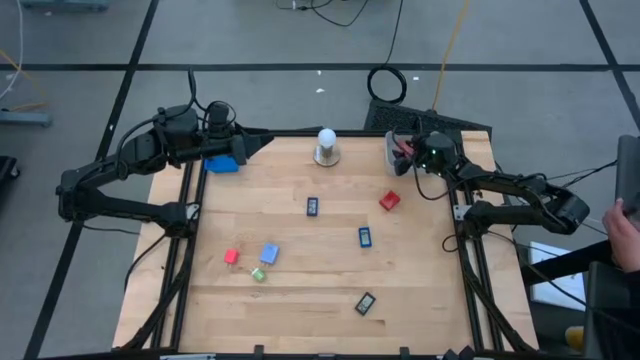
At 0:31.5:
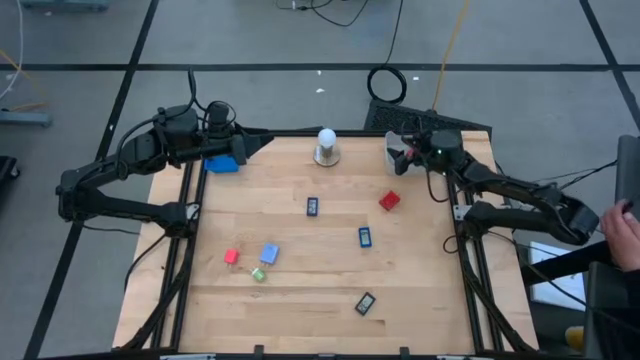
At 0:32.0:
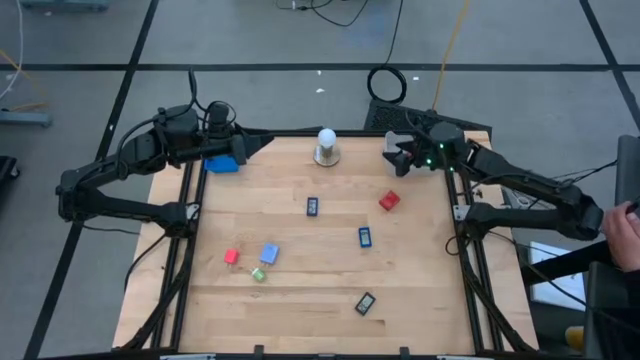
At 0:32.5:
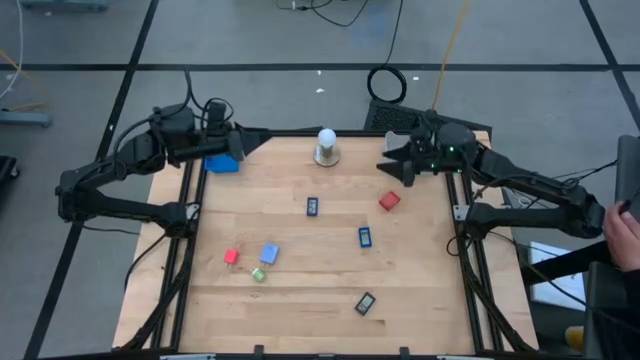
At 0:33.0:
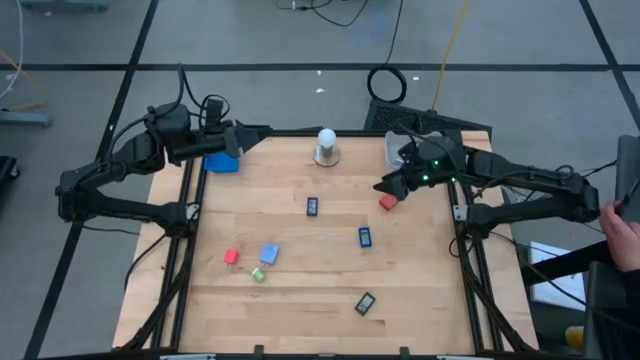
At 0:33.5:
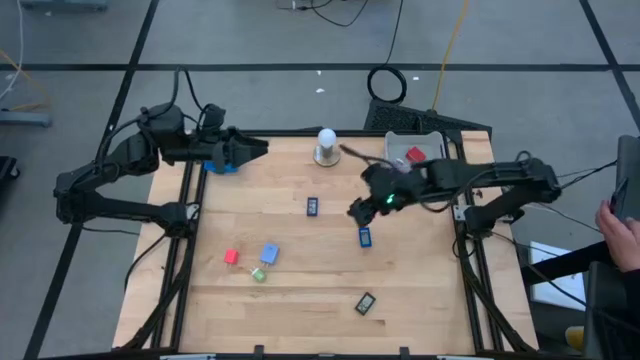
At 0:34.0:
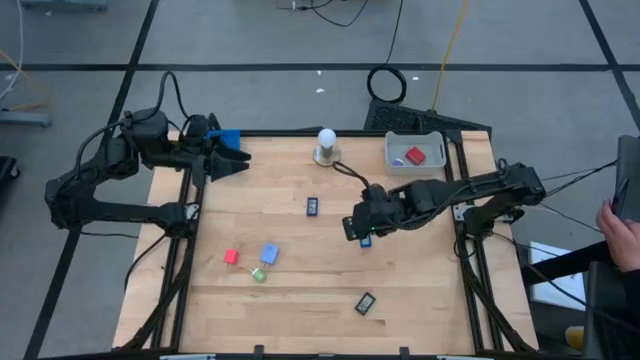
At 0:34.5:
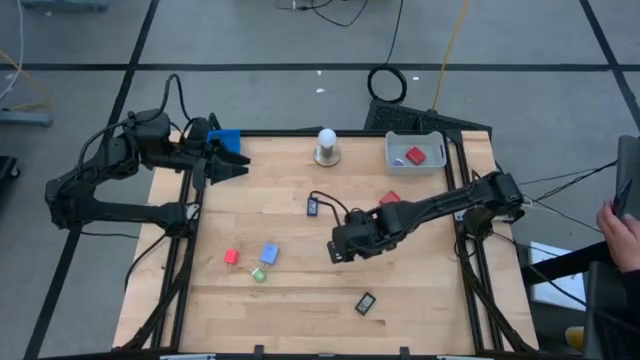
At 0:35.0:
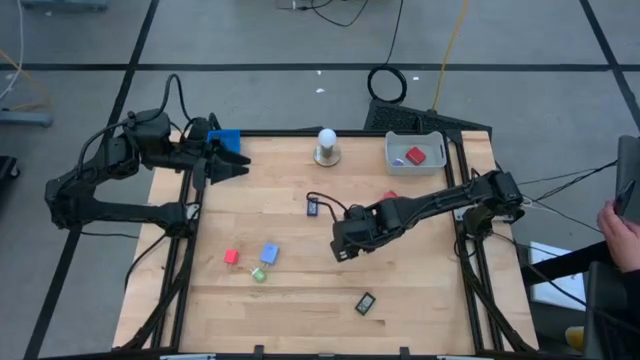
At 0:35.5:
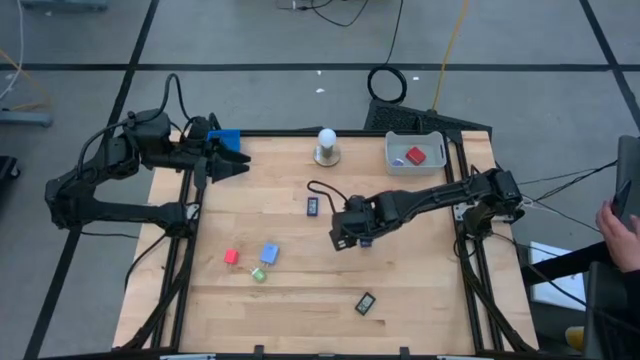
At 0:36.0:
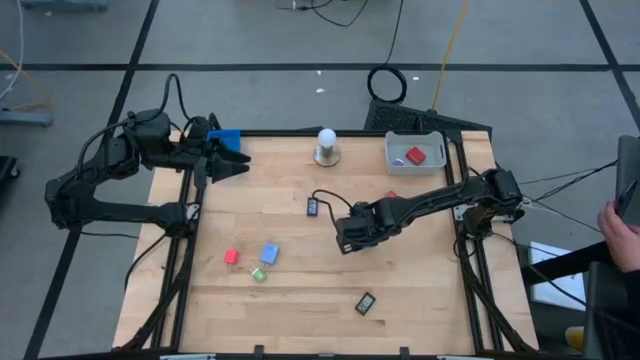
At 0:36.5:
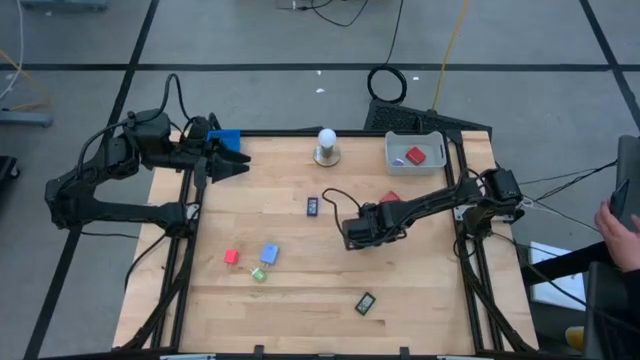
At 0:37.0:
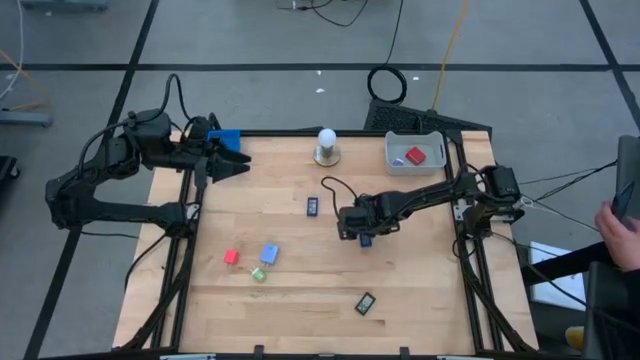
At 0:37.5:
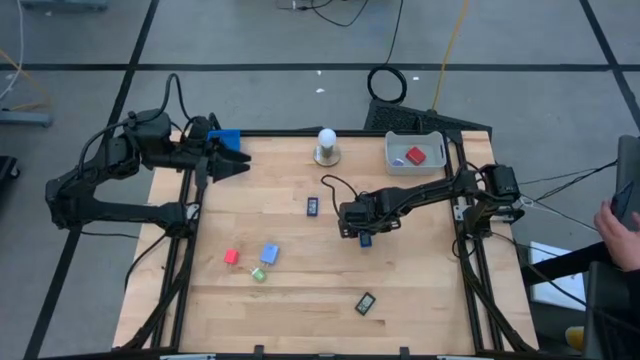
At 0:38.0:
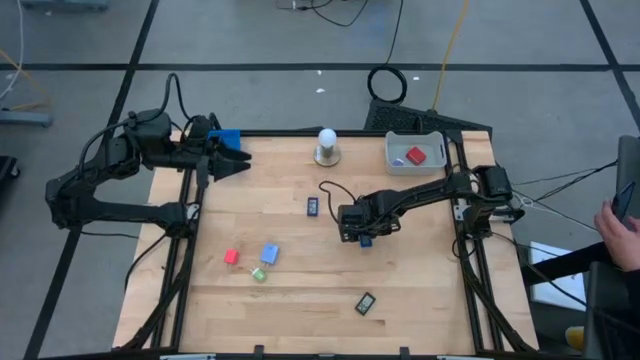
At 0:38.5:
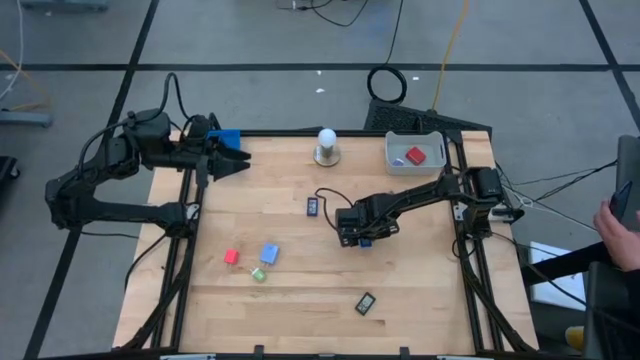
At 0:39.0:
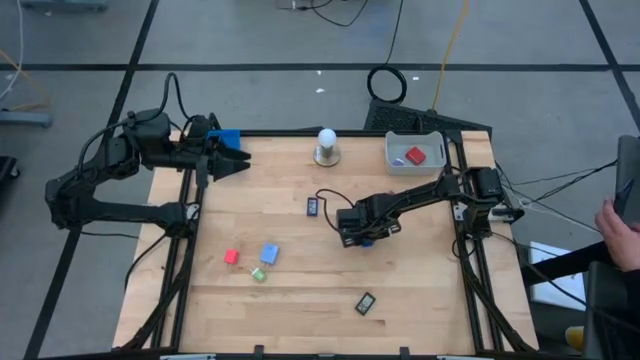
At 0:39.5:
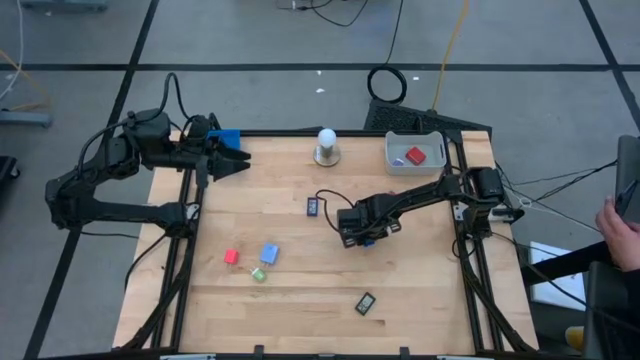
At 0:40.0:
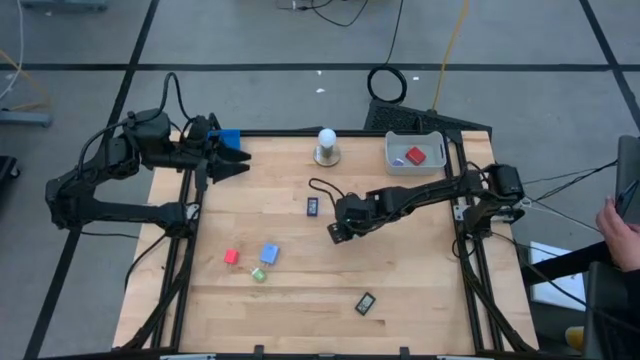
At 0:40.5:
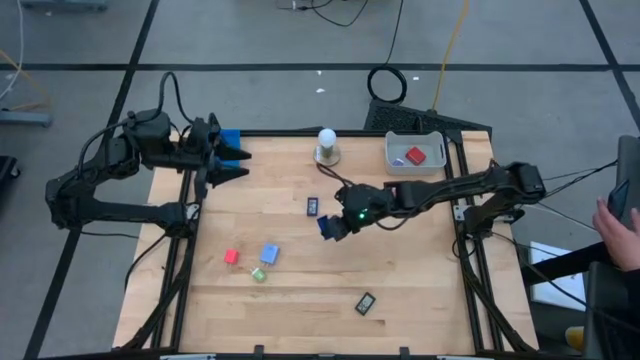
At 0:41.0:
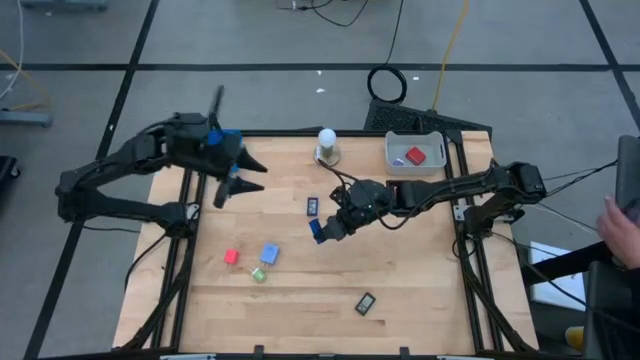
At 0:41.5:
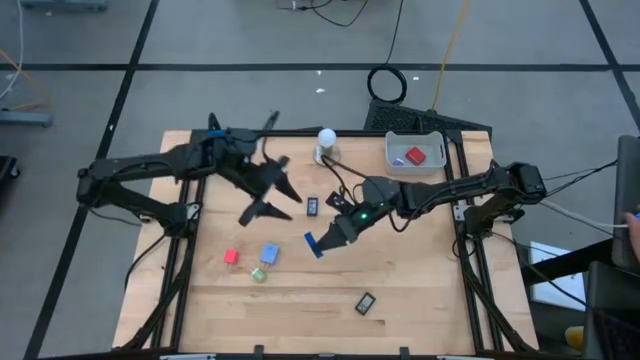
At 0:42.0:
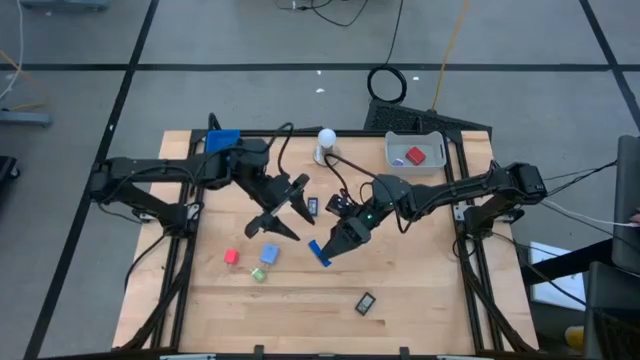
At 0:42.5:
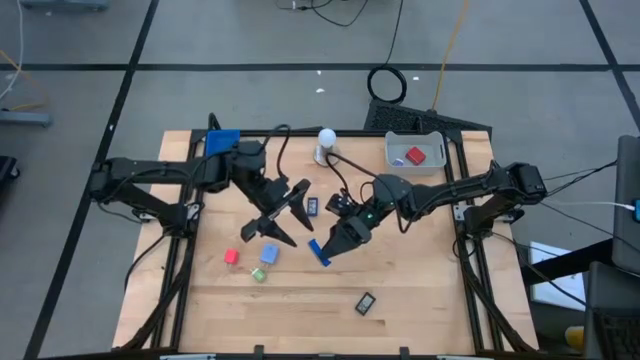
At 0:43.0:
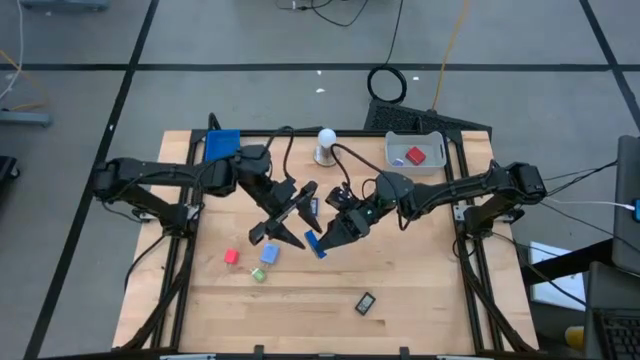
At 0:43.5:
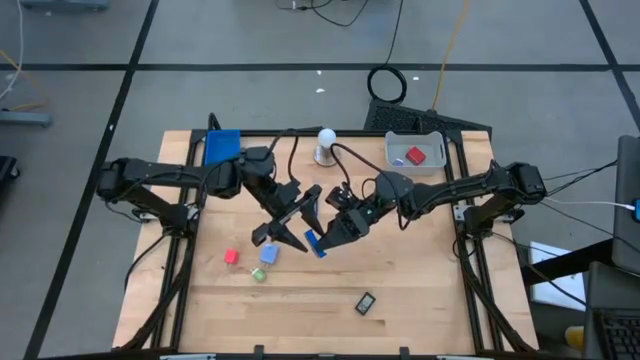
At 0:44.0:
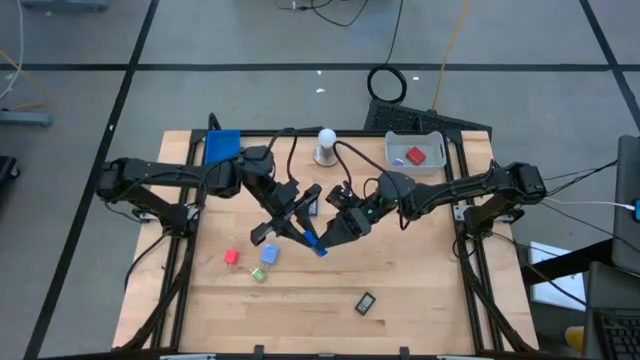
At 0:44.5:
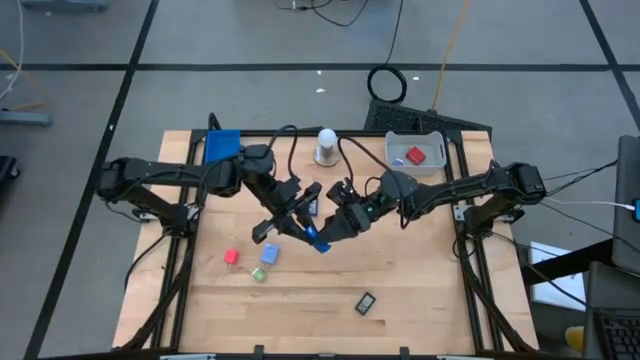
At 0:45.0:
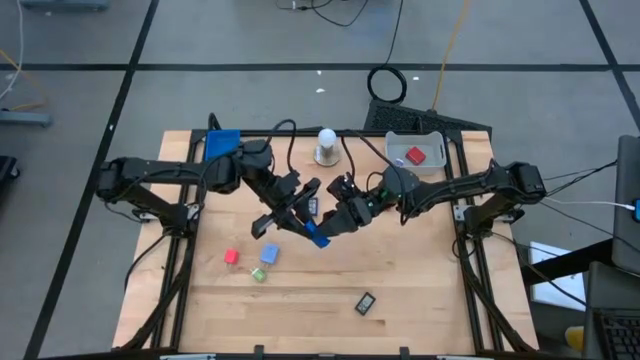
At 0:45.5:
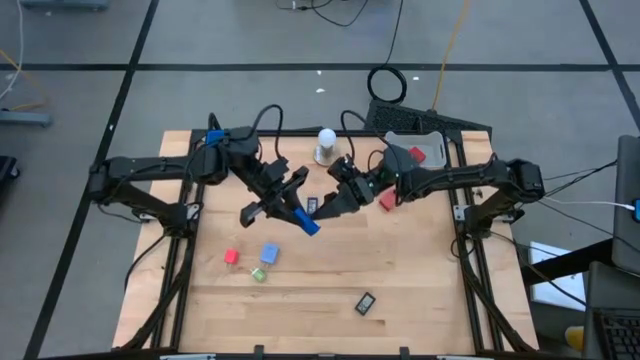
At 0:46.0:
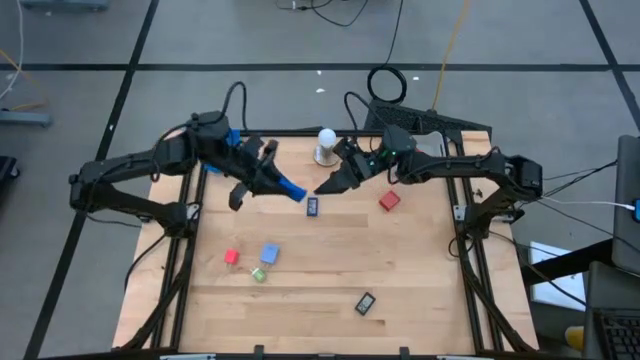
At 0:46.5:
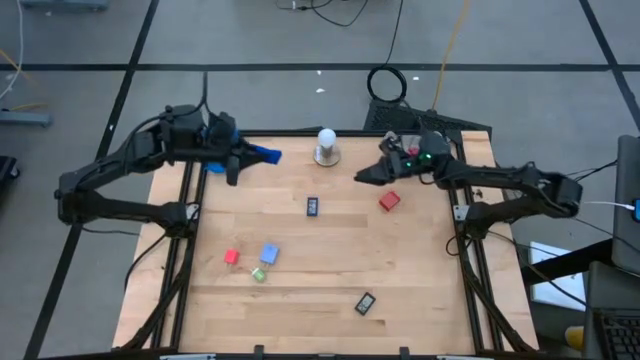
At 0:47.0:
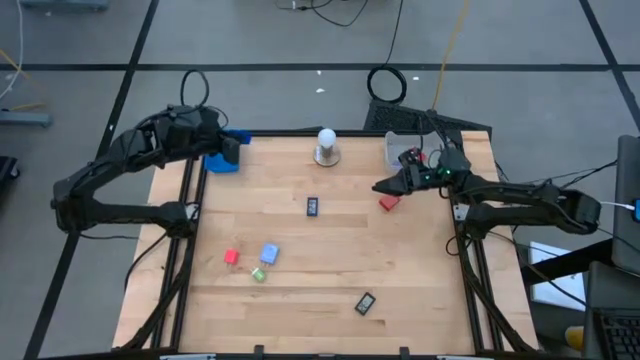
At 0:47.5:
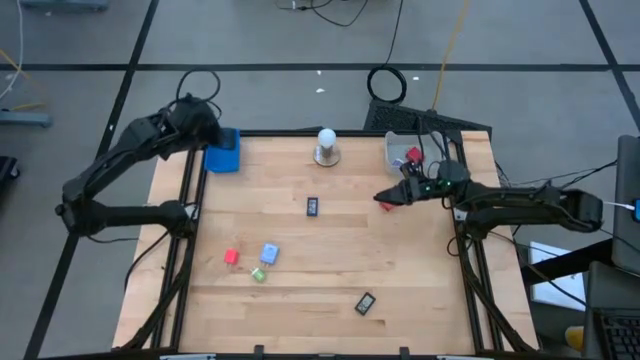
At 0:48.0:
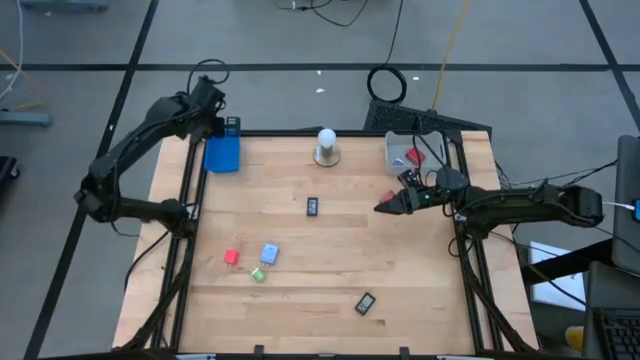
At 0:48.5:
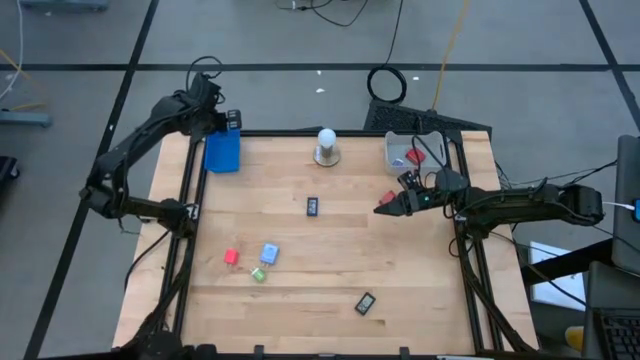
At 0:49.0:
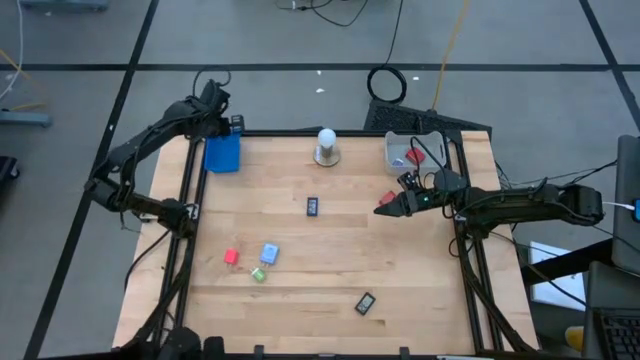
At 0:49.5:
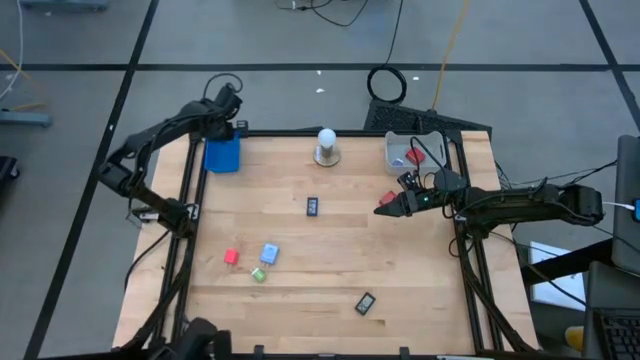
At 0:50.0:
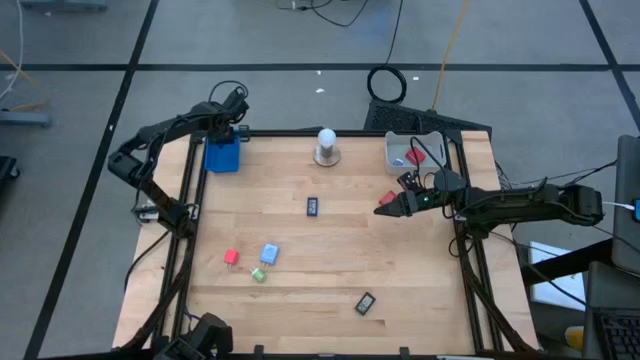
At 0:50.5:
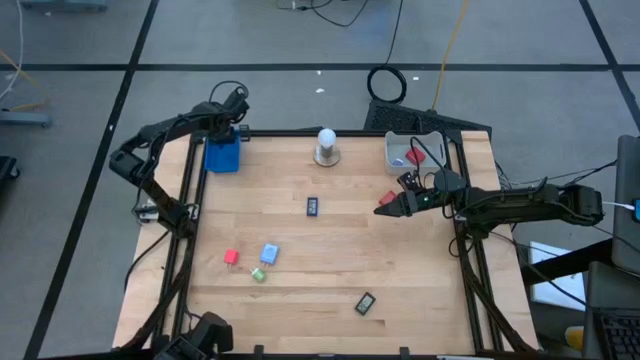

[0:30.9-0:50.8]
Task: Pick & Place Office items
Put the bottom blue digital clock into the blue bin

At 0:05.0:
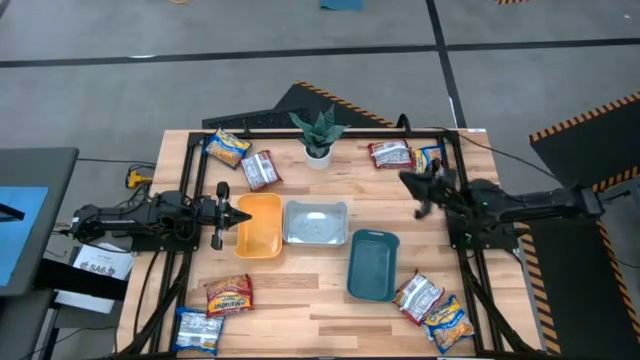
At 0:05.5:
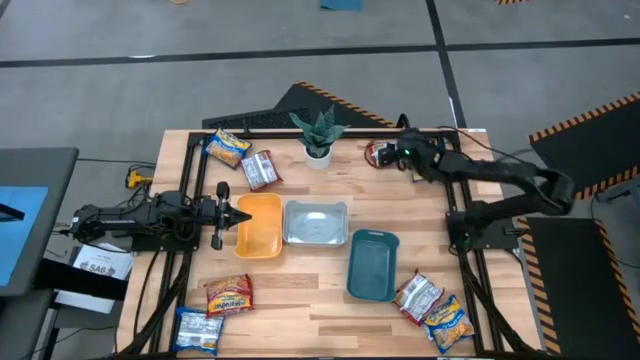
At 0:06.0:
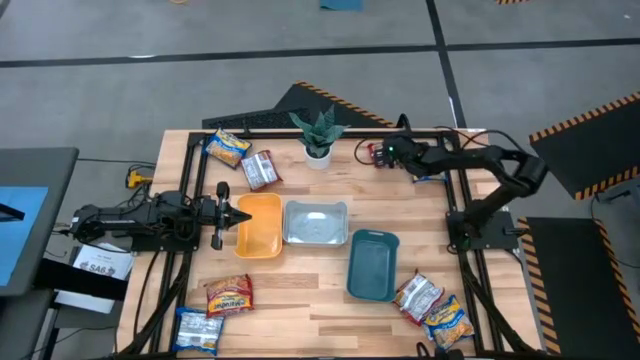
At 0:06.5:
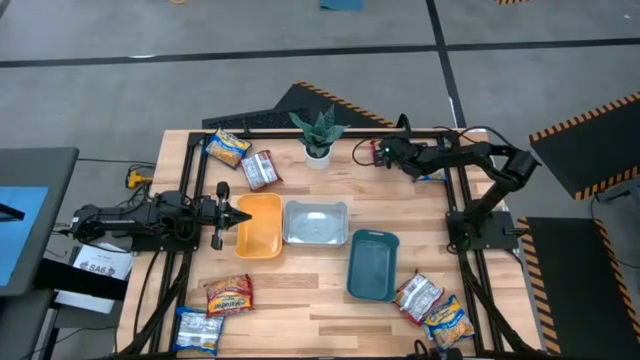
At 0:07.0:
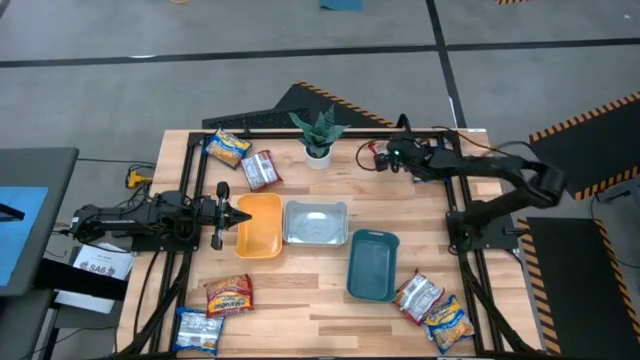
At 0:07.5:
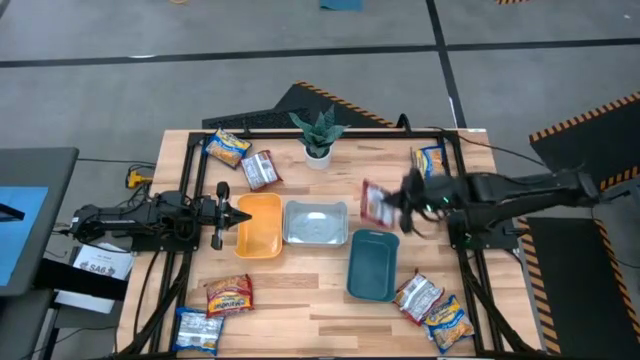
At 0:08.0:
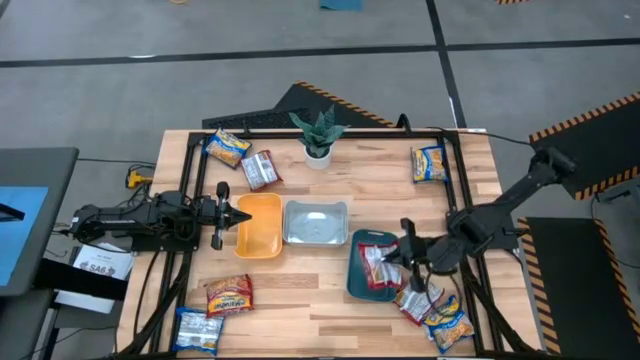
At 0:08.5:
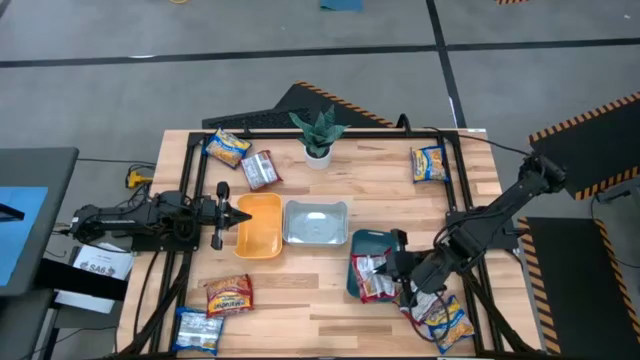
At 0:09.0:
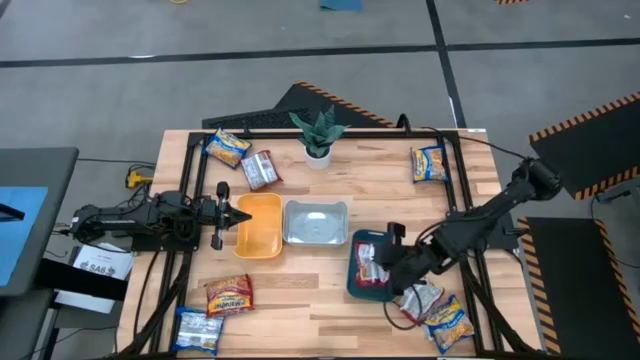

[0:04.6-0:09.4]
Task: Sort Maruchan noodles
Put the top right red noodle pack into the blue bin
